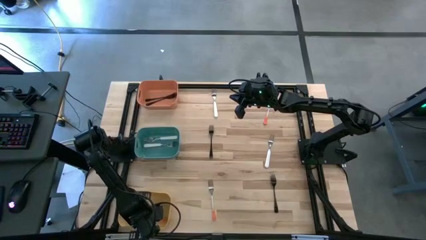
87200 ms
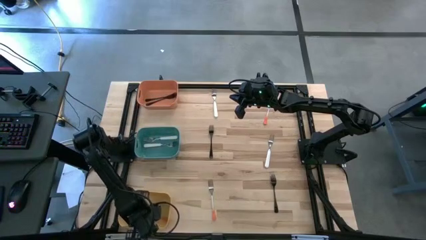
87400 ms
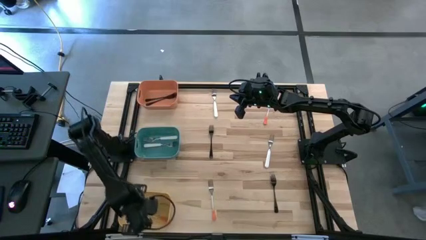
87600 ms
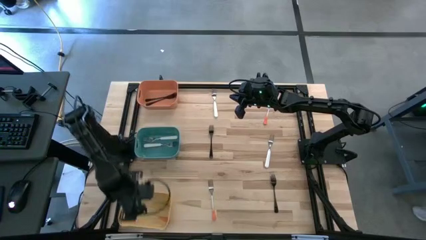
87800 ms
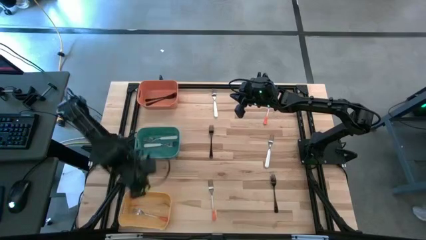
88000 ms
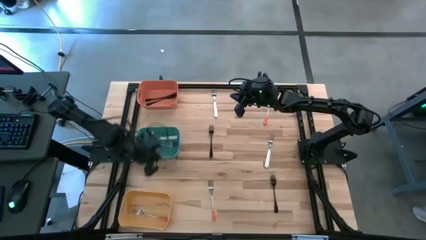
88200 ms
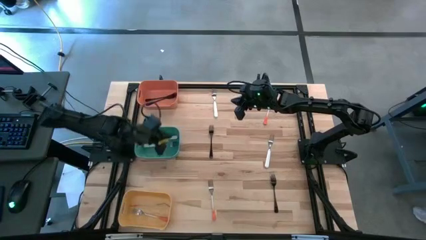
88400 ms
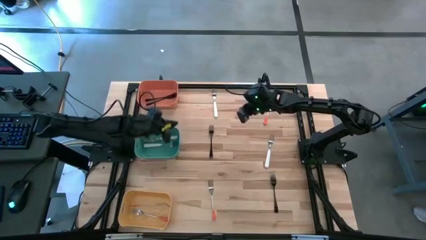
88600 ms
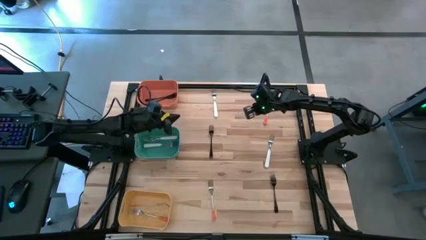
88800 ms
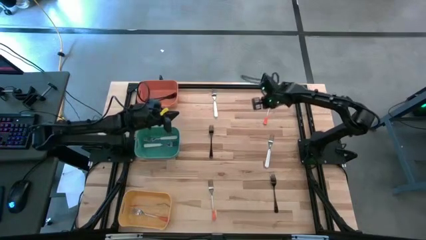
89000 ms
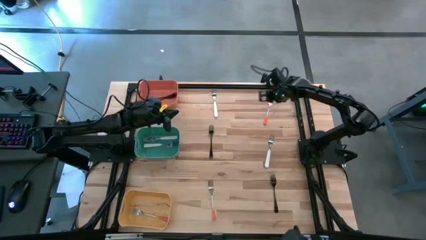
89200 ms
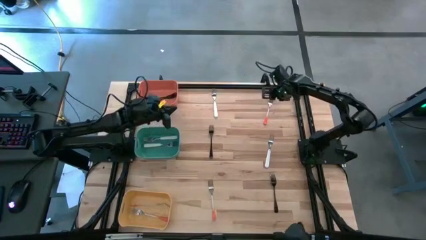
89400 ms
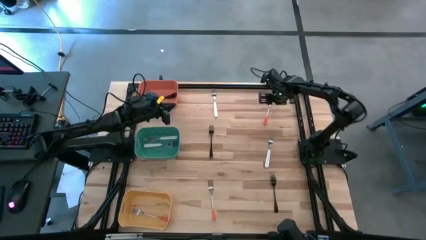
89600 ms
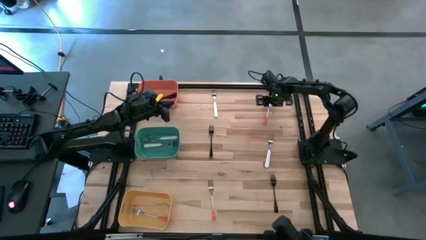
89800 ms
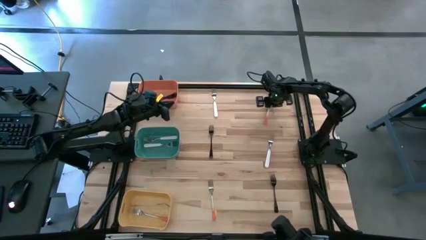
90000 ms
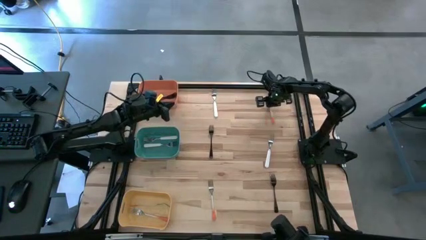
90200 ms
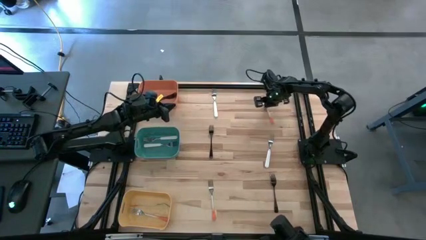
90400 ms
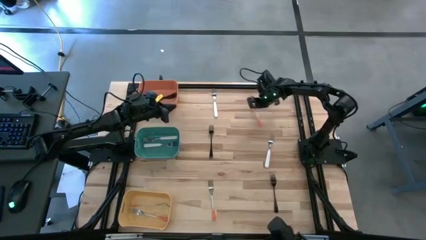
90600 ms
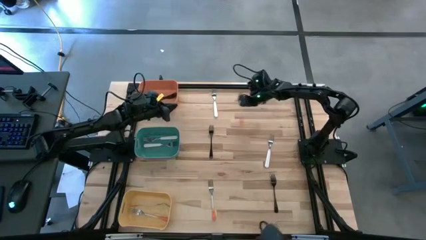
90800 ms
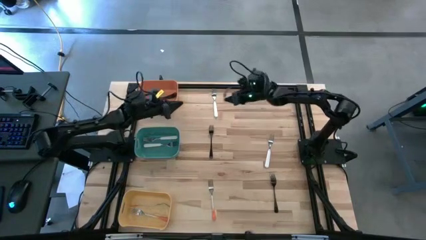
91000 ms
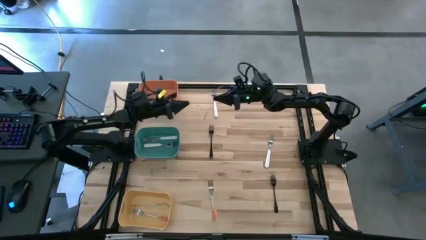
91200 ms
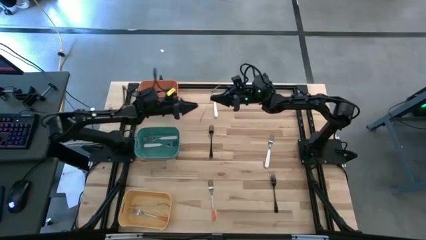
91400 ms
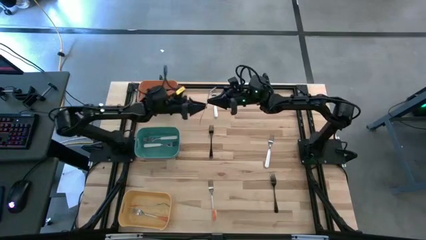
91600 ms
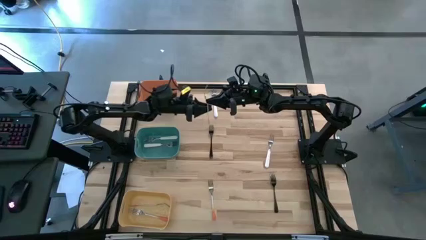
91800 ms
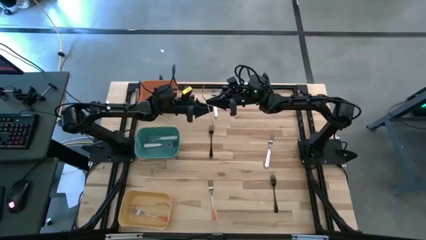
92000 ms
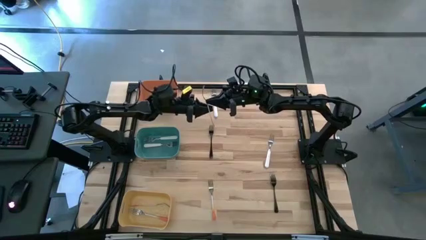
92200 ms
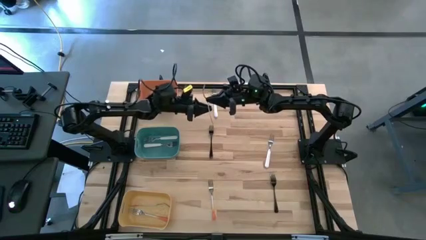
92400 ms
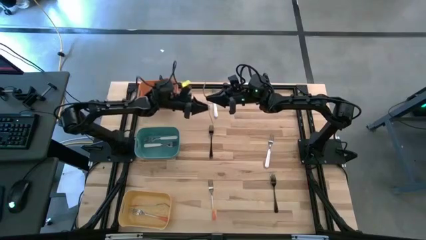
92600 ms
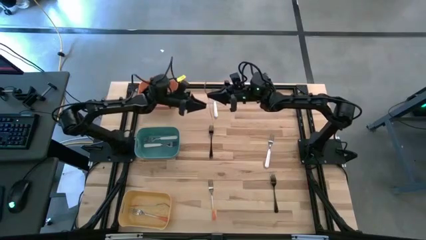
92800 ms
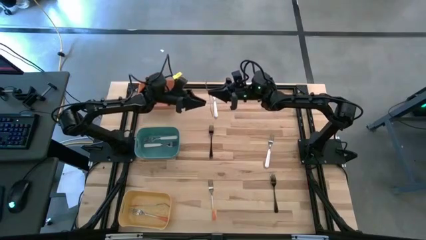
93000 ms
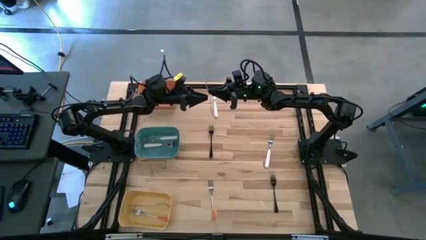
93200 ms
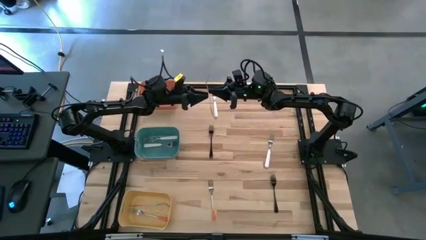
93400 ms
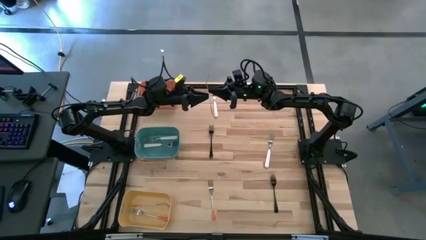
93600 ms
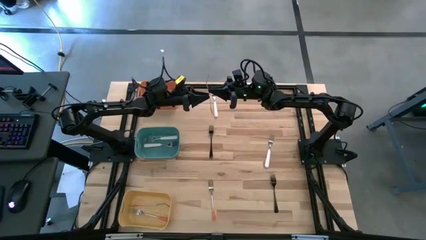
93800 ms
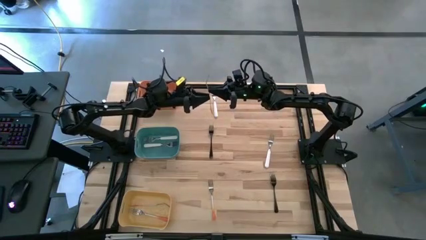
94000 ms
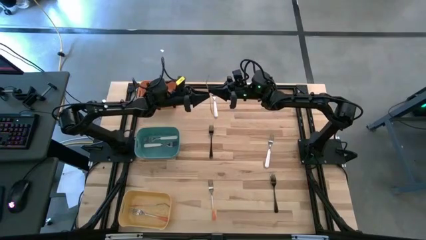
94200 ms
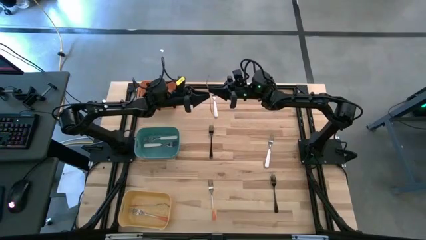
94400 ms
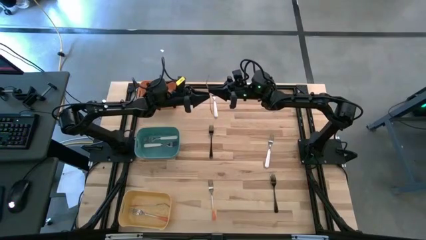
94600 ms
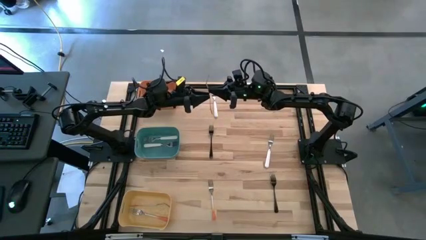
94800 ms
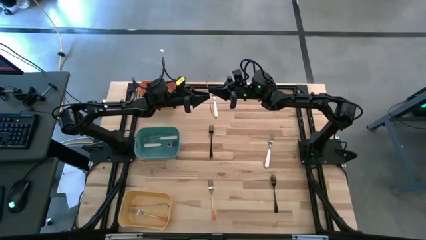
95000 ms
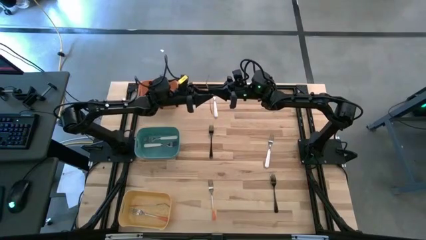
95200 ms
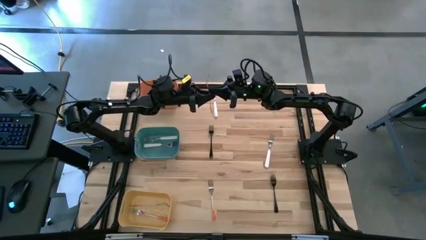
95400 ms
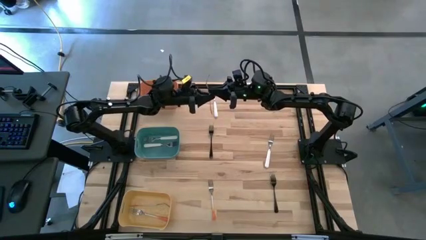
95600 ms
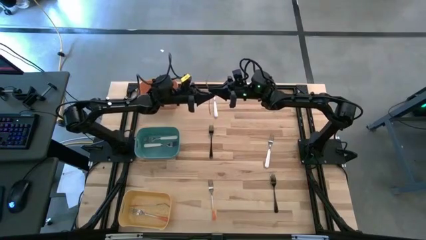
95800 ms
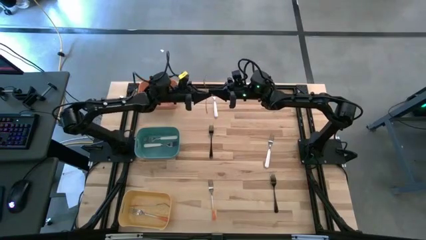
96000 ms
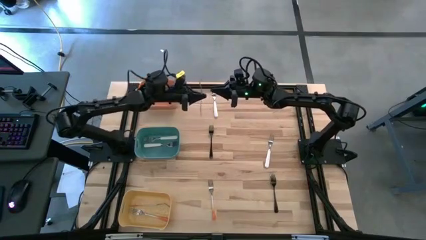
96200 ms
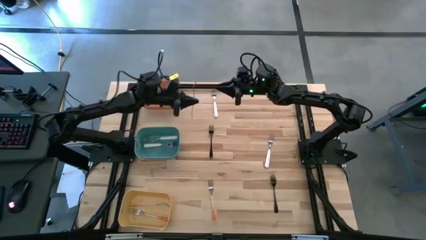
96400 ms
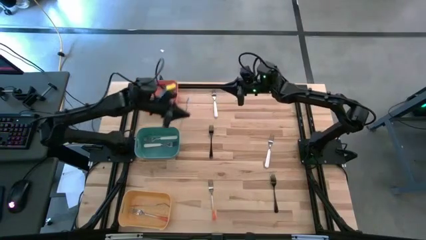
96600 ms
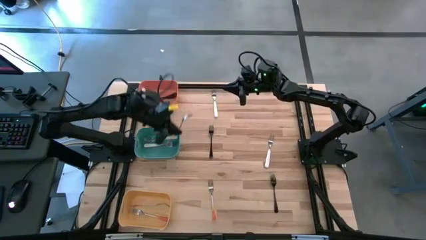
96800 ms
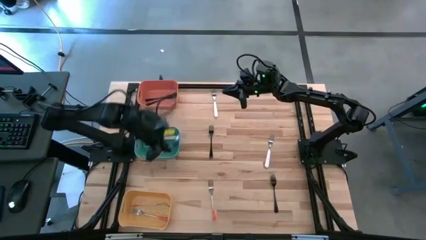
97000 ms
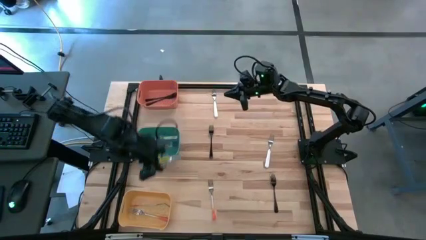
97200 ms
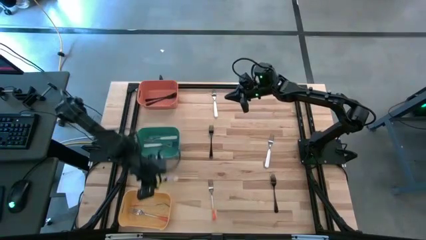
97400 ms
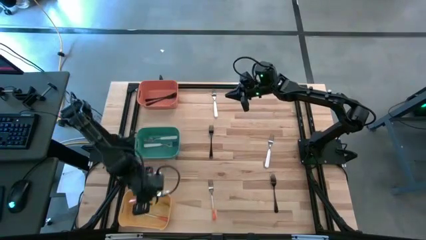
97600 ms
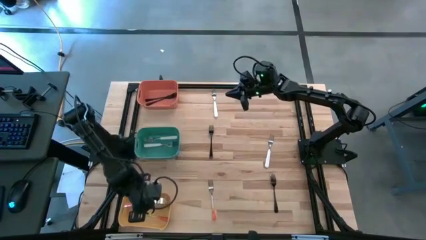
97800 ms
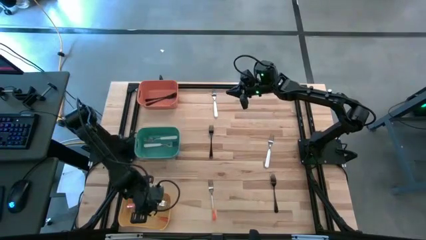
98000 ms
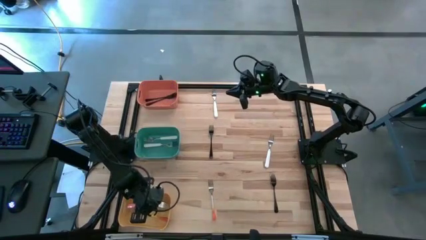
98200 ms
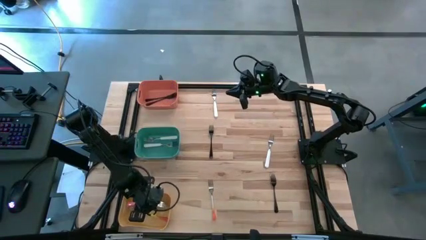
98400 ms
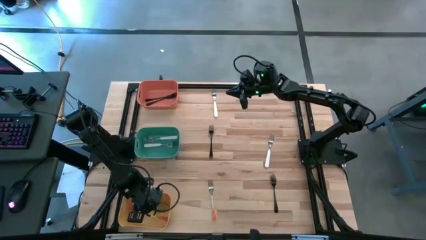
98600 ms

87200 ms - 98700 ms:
Task: Sort silverware by color (type)
Put the orange fork into the yellow bin
